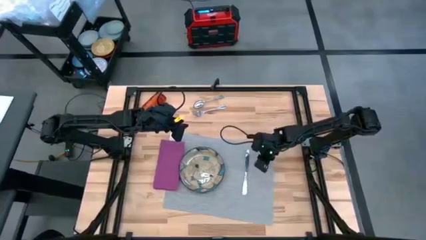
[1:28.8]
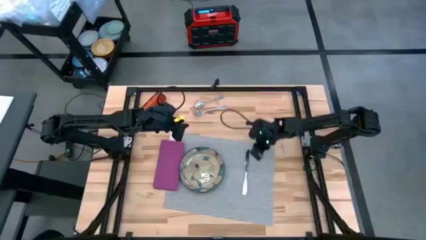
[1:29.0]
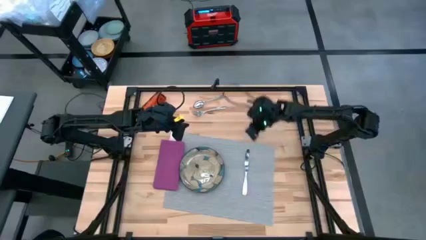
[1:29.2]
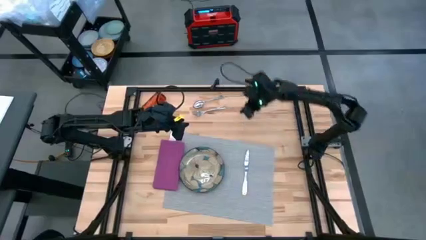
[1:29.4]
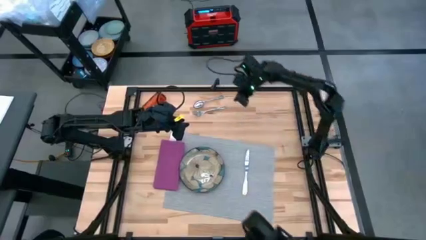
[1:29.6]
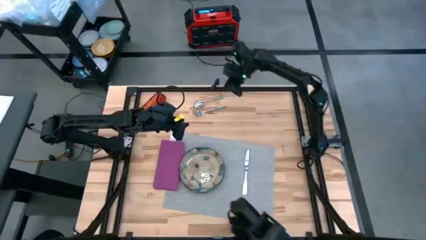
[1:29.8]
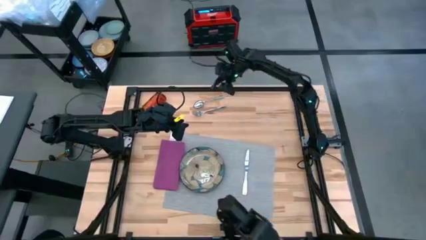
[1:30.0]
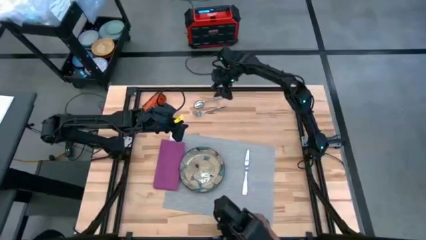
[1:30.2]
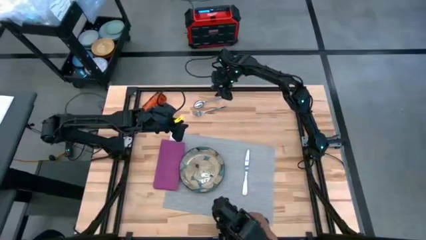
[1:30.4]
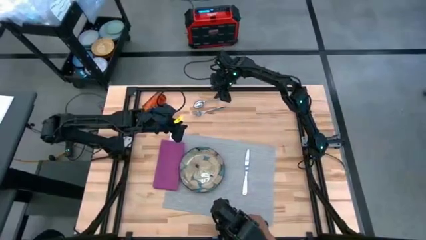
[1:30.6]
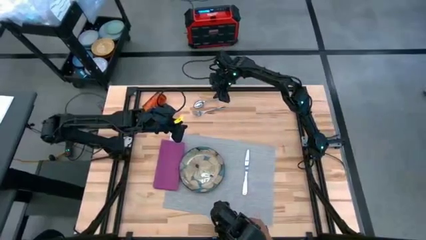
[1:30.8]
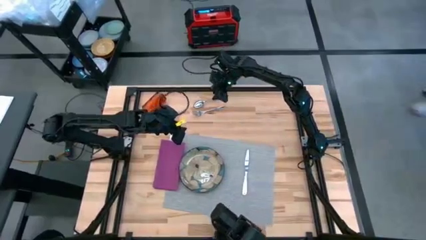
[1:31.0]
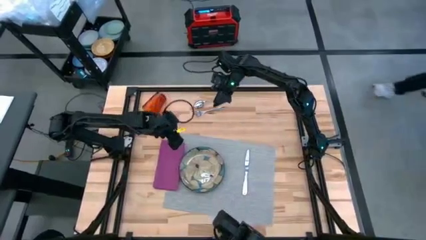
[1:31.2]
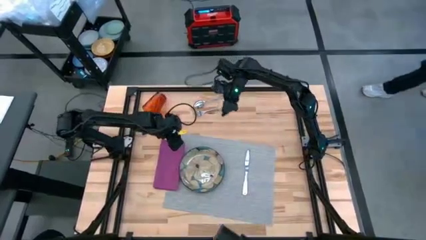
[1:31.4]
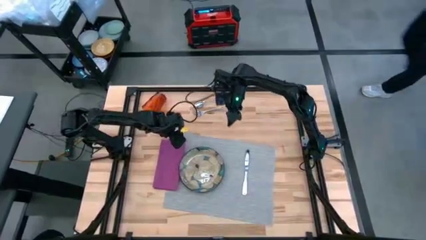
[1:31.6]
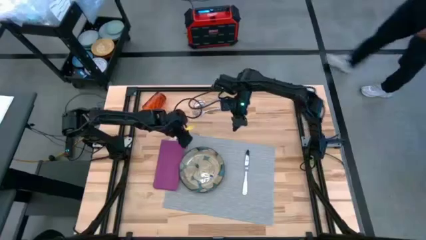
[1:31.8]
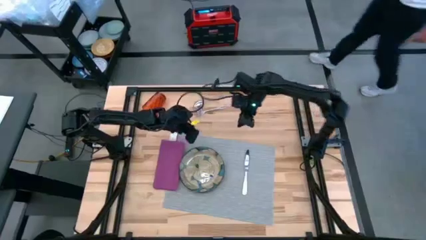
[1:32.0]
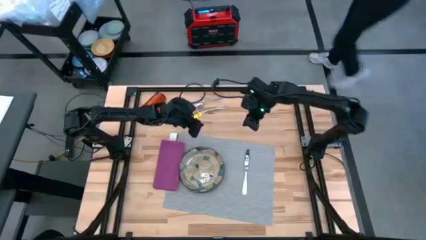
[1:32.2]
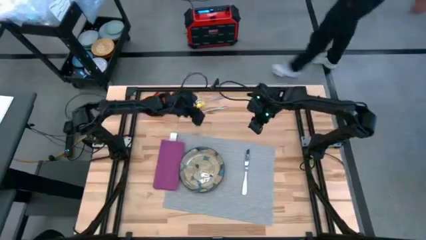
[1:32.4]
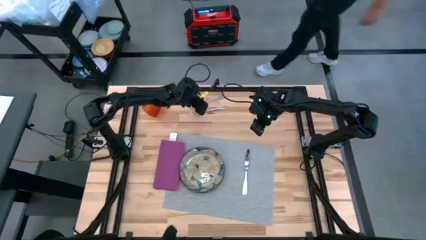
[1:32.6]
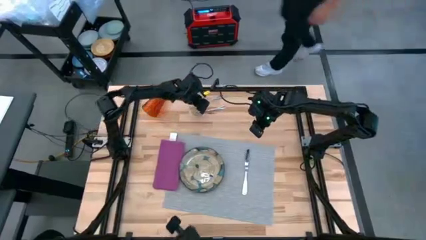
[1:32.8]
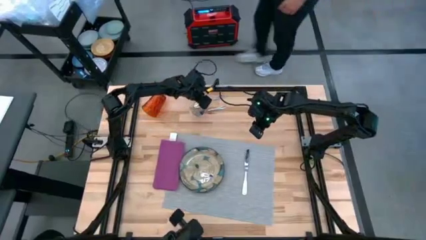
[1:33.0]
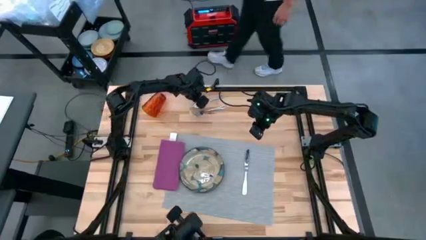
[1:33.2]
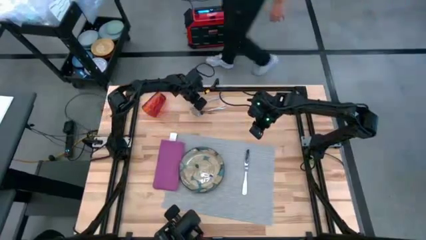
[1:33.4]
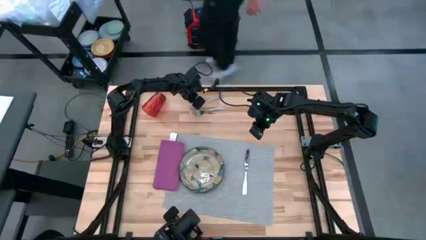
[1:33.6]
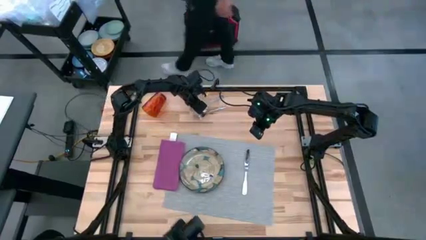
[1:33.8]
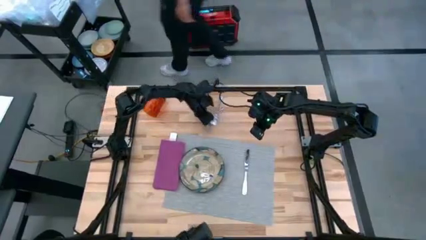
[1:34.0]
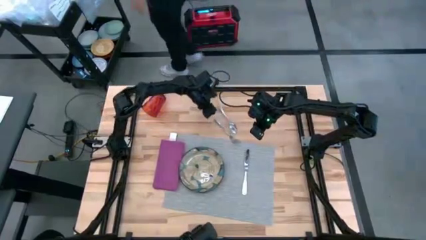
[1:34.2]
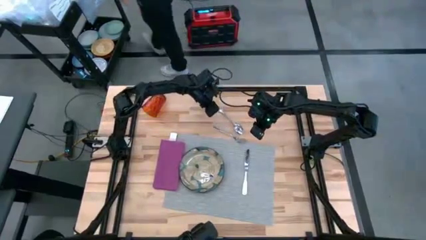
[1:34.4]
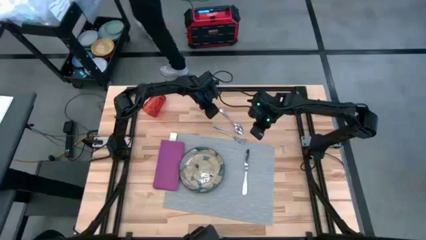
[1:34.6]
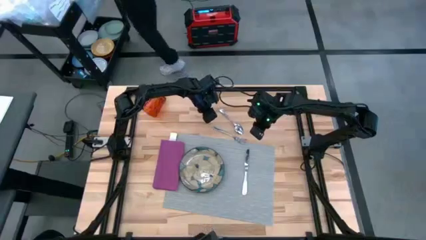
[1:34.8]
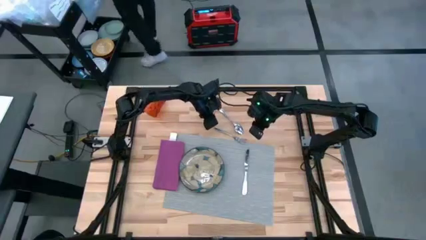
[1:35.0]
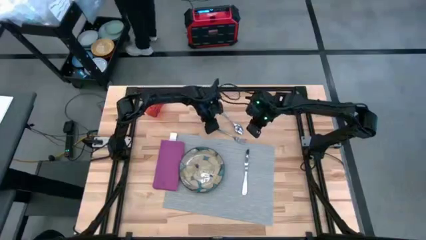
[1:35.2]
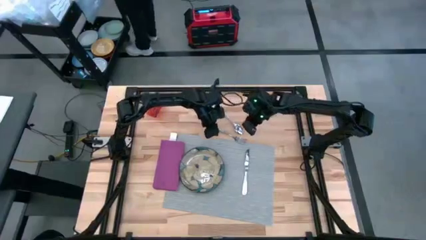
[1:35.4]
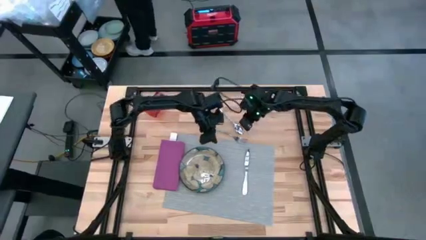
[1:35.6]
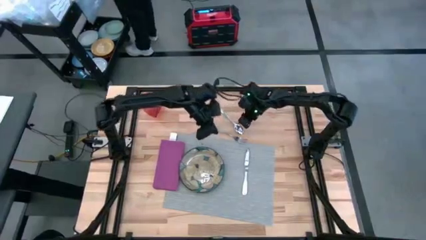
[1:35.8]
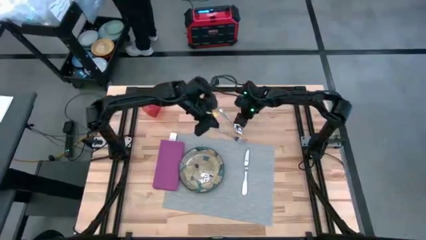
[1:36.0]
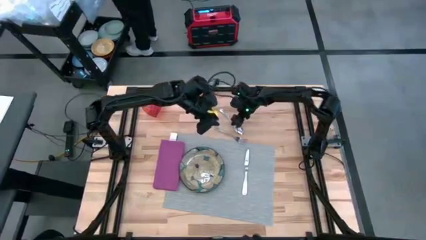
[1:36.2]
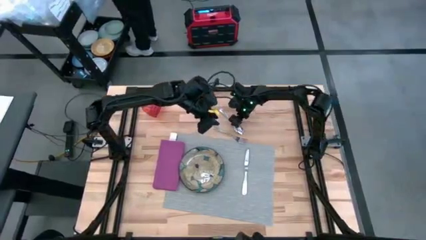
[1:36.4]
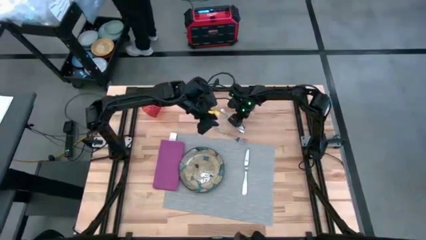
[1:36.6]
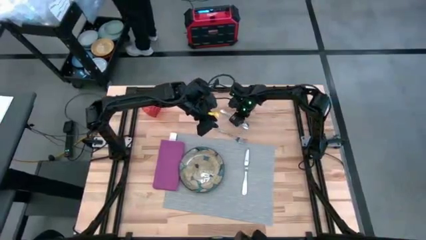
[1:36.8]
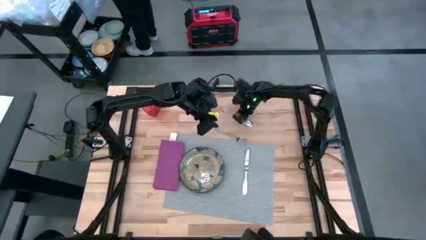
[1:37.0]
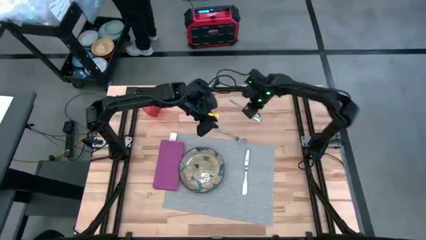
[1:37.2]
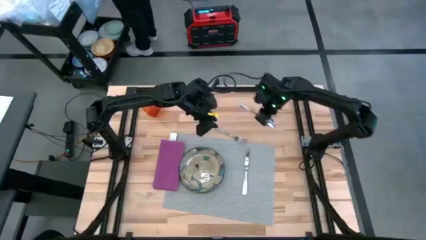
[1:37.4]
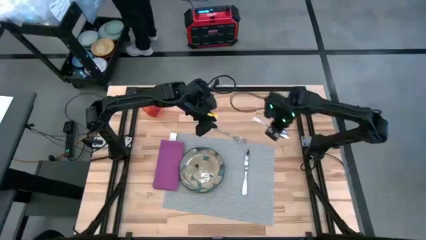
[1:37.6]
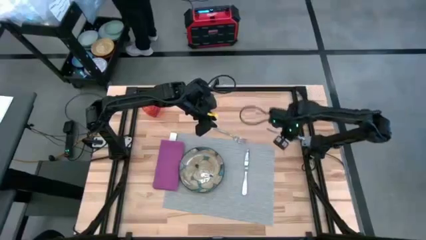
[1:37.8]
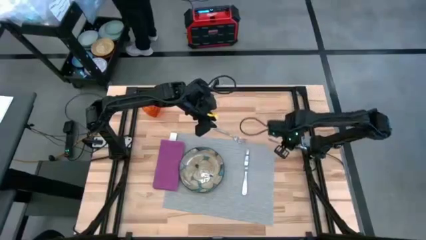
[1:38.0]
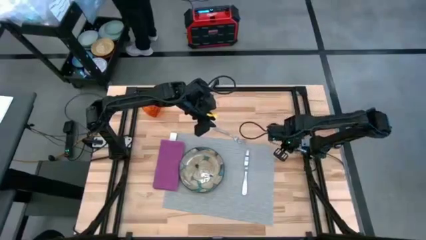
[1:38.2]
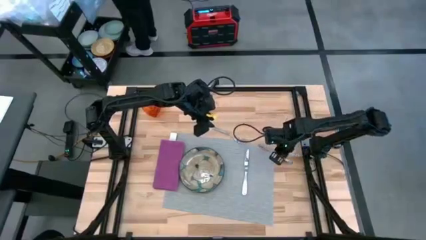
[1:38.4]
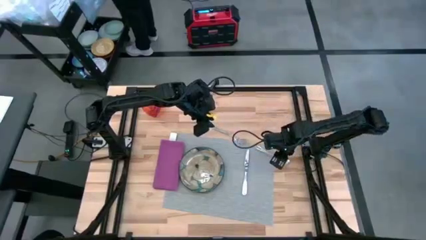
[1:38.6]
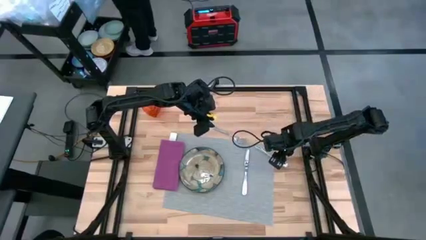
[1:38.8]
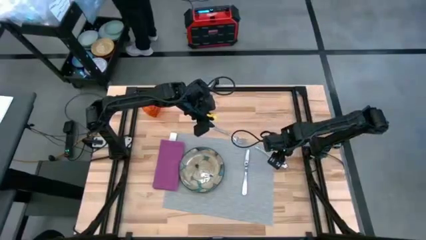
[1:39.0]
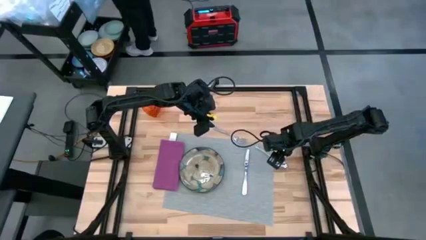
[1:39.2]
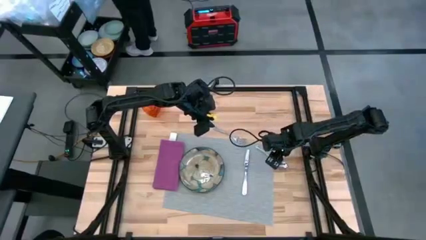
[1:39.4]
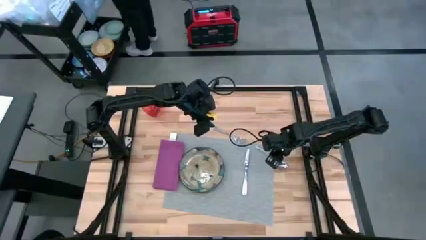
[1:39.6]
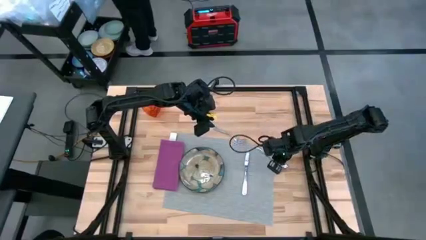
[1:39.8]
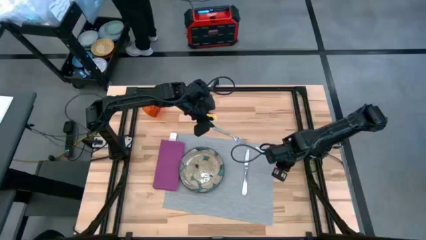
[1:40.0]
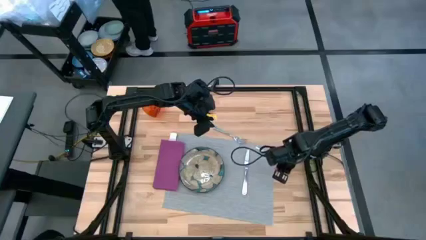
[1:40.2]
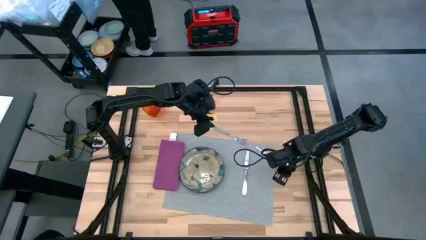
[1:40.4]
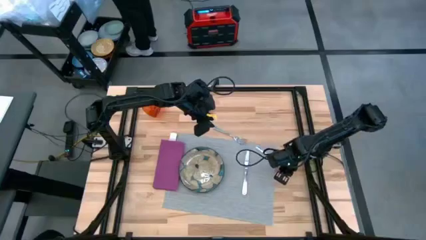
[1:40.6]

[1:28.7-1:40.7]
Task: Set table place
Put the silver spoon to the right of the silver table knife on the table mat

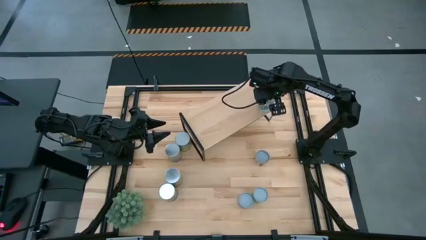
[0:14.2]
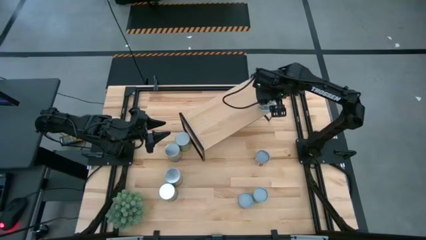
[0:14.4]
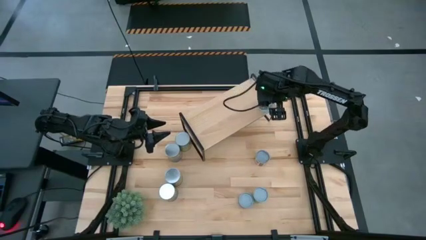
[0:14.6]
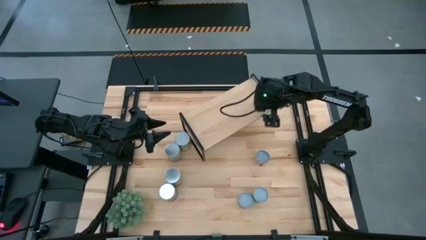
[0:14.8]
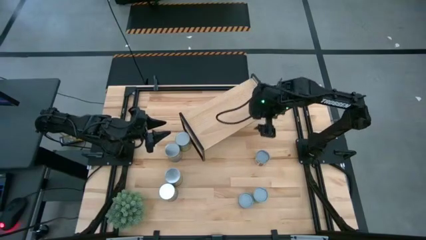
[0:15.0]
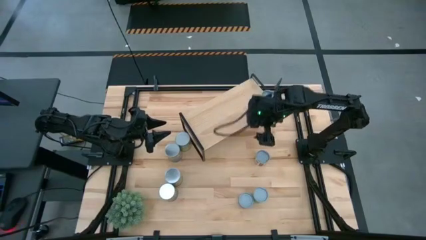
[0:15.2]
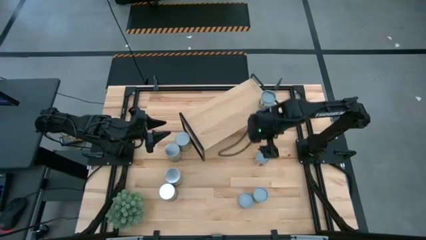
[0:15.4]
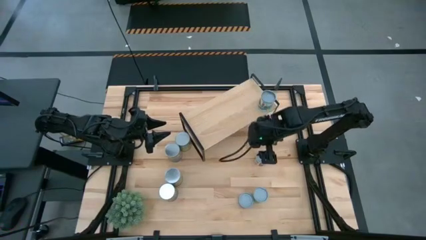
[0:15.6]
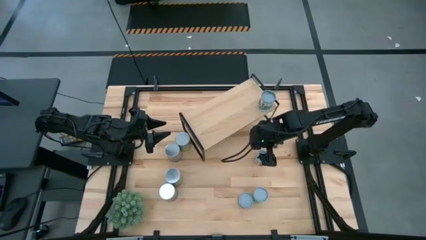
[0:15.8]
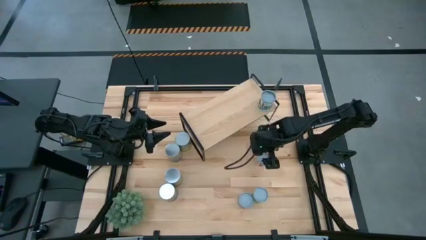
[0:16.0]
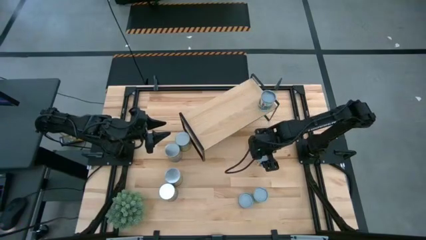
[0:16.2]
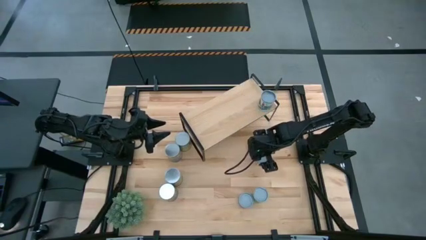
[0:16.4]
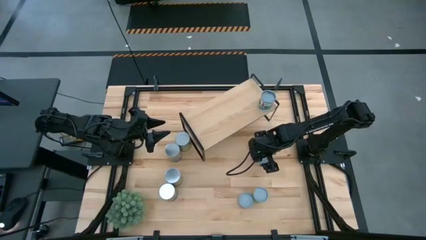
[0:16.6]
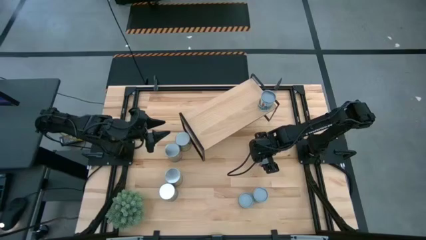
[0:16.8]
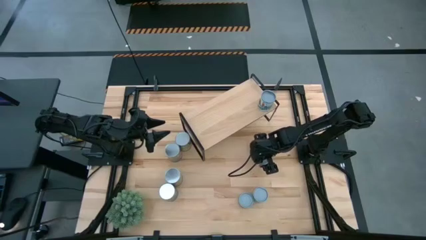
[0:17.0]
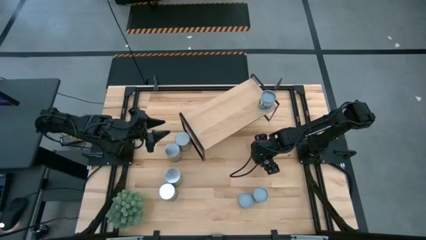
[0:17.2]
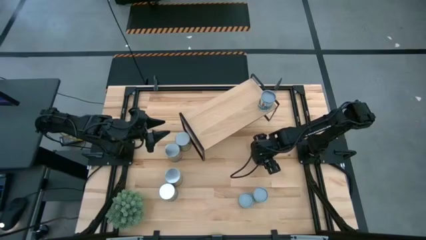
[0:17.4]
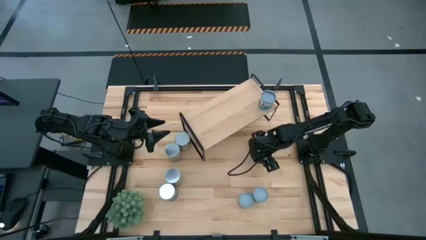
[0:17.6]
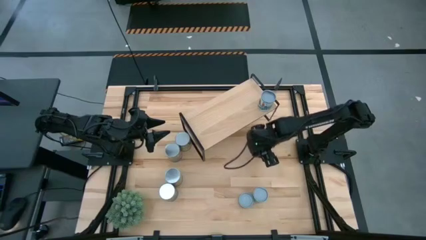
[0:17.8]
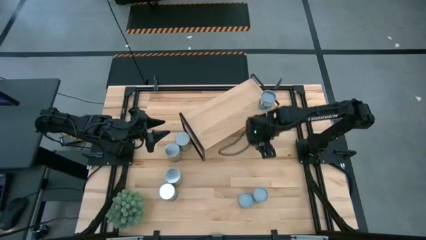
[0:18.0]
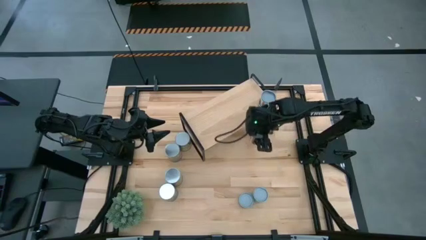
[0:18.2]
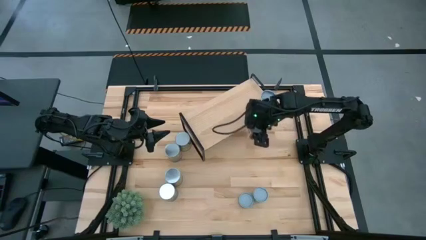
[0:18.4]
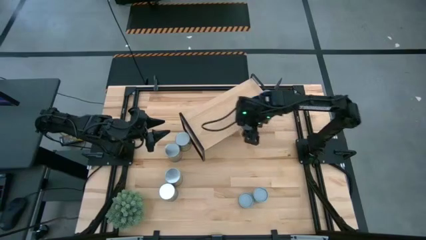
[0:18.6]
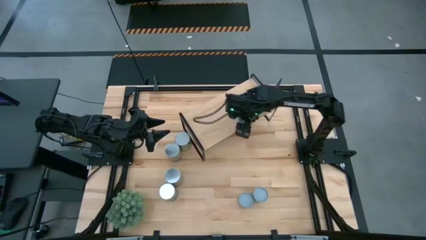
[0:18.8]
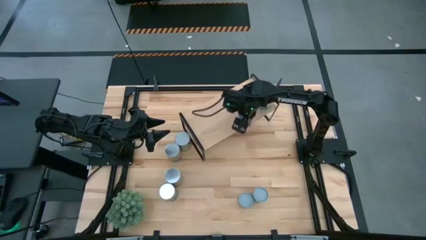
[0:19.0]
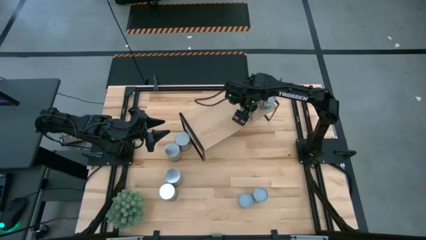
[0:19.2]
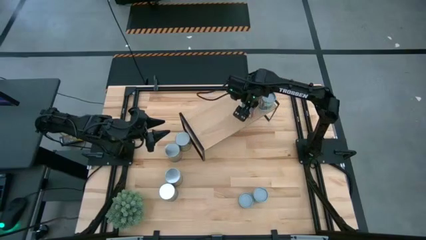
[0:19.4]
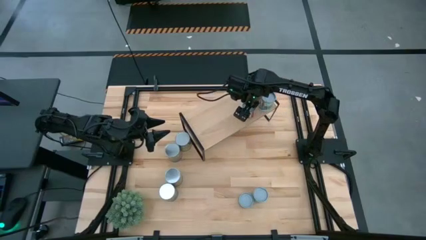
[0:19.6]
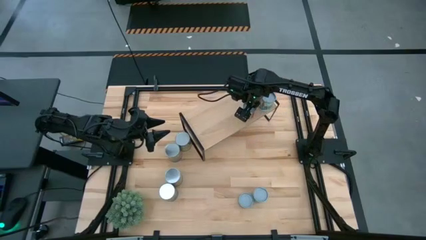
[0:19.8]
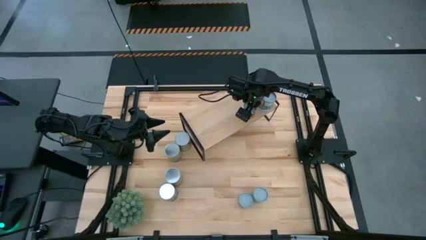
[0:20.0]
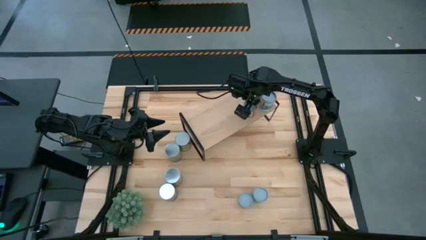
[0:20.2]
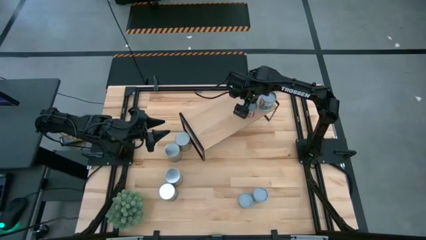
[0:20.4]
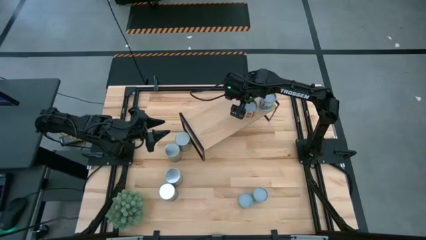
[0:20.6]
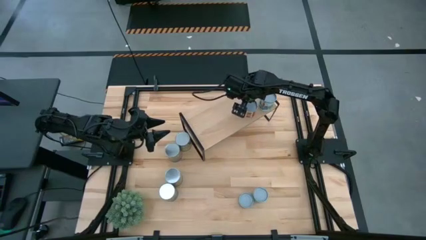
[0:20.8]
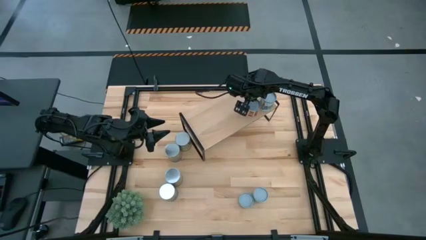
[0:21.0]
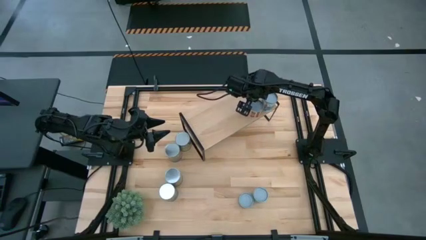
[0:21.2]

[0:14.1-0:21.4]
Task: Pick and place cans onto a shelf
Put the canned diced tomatoes on the shelf
